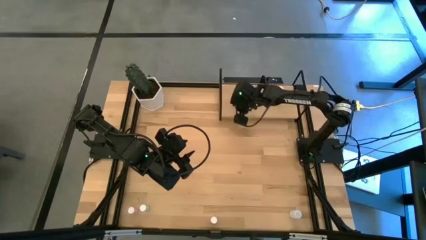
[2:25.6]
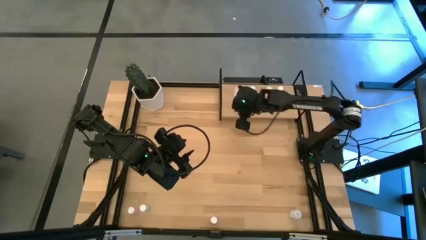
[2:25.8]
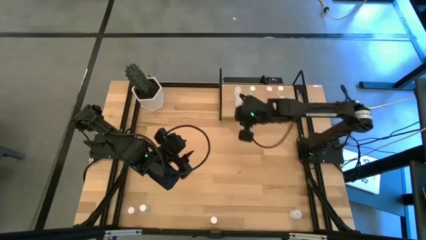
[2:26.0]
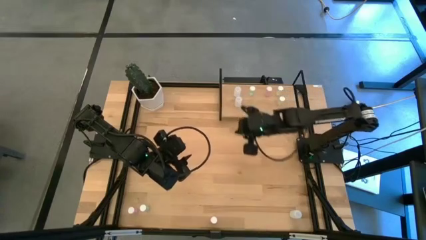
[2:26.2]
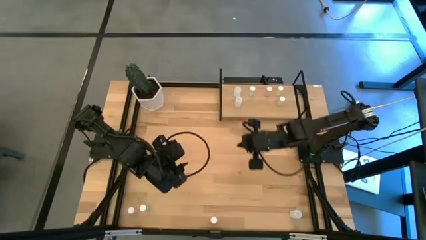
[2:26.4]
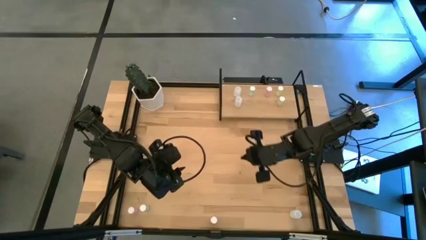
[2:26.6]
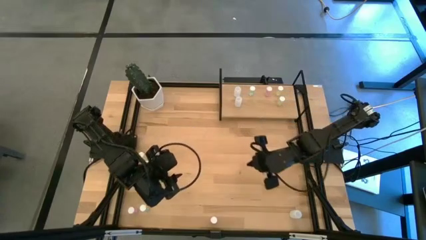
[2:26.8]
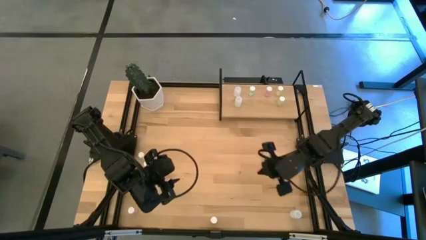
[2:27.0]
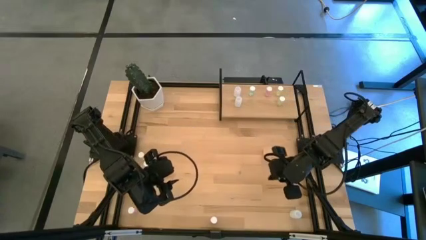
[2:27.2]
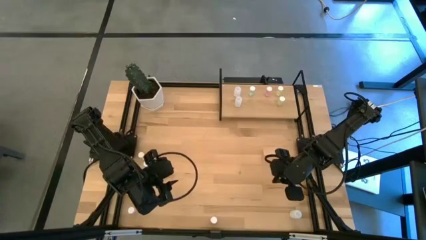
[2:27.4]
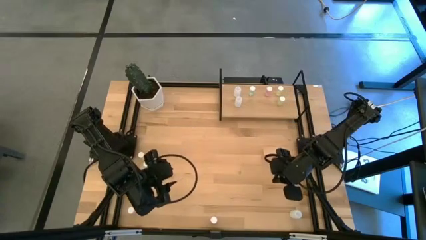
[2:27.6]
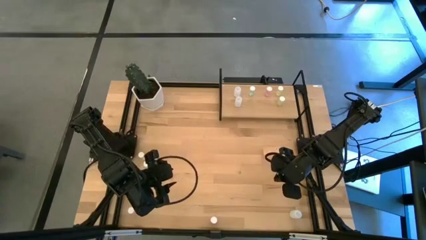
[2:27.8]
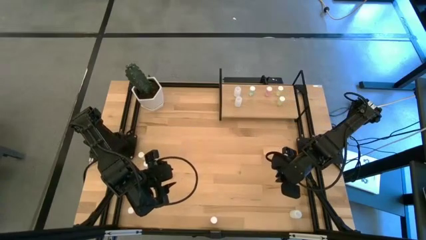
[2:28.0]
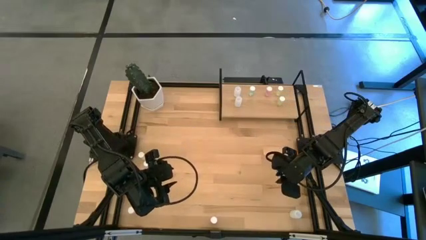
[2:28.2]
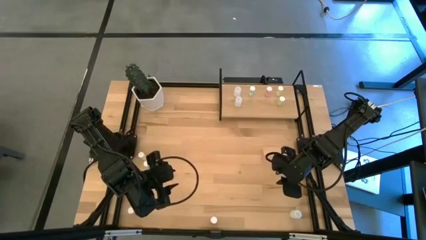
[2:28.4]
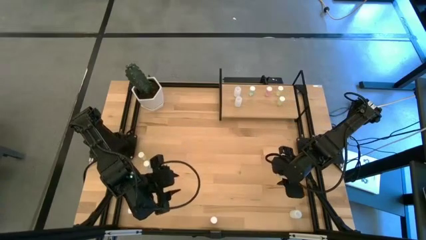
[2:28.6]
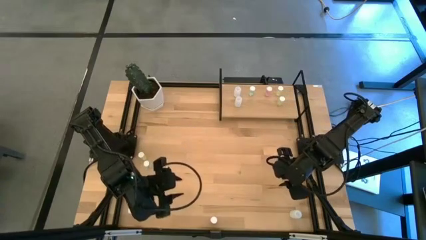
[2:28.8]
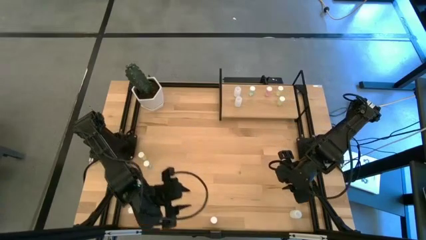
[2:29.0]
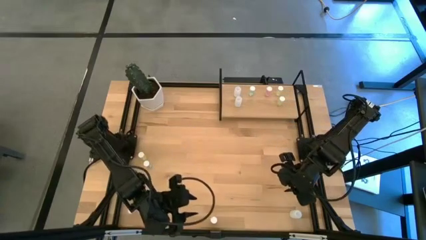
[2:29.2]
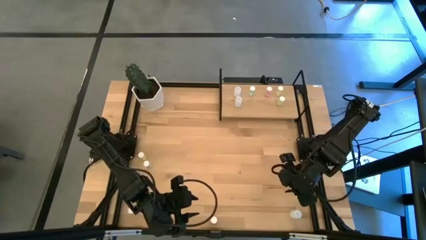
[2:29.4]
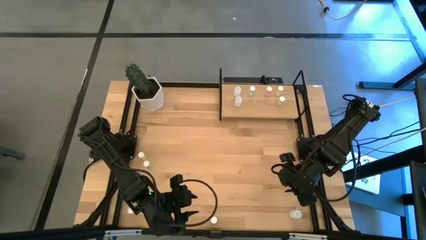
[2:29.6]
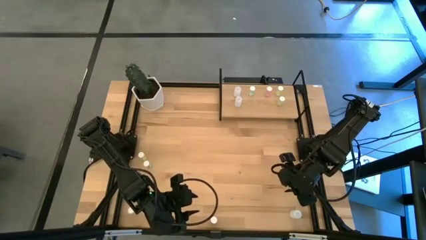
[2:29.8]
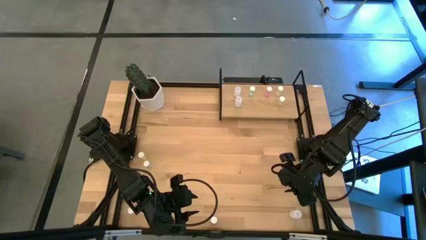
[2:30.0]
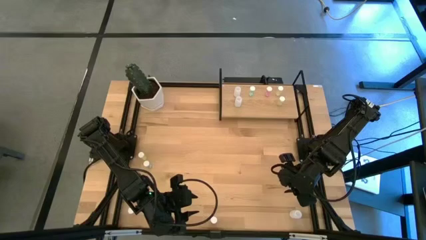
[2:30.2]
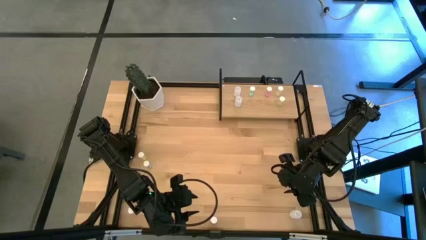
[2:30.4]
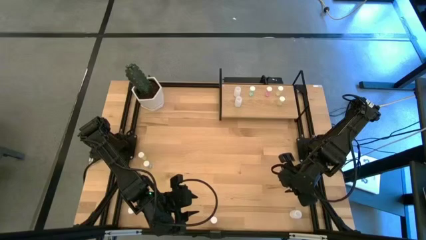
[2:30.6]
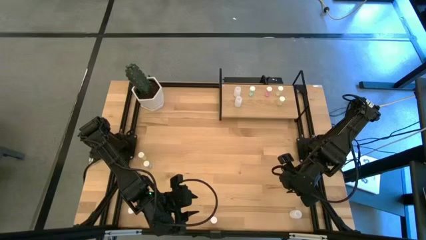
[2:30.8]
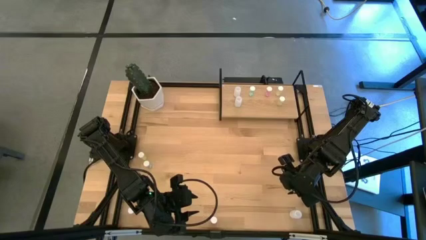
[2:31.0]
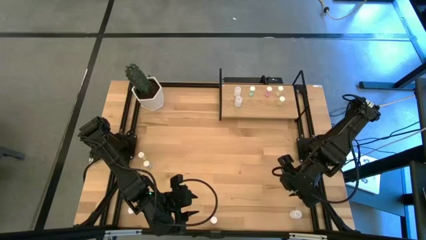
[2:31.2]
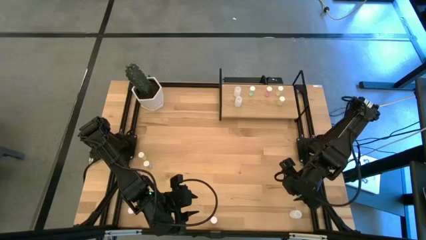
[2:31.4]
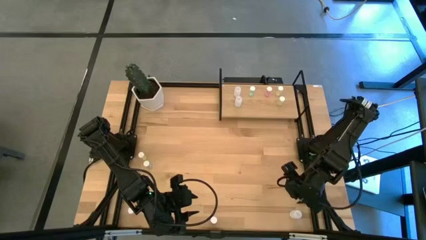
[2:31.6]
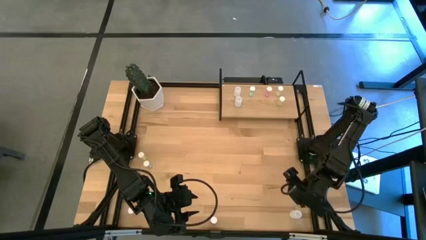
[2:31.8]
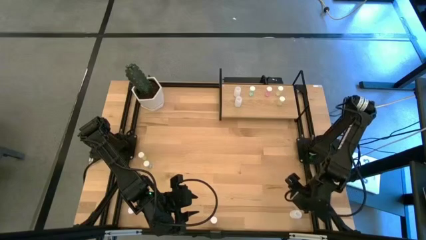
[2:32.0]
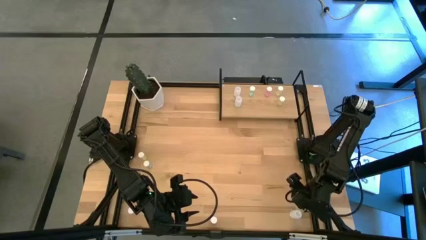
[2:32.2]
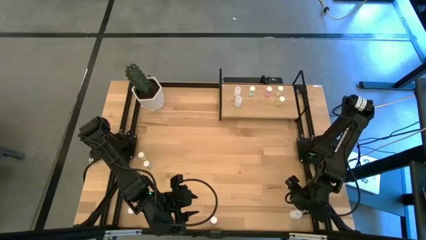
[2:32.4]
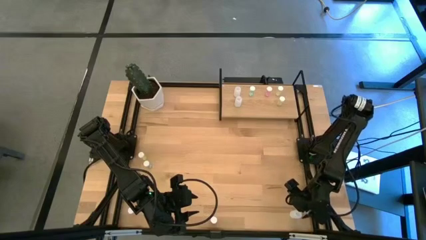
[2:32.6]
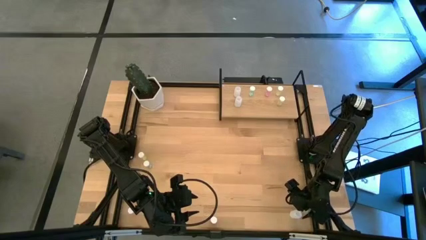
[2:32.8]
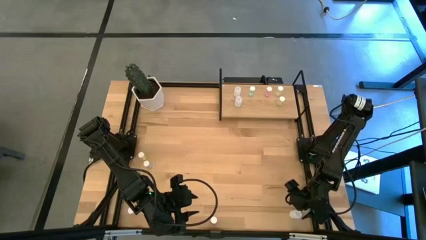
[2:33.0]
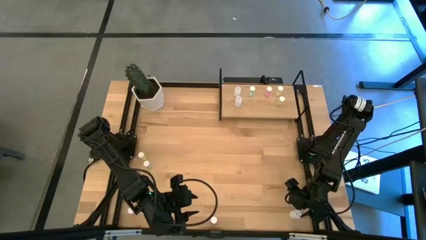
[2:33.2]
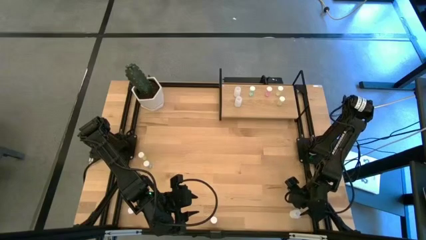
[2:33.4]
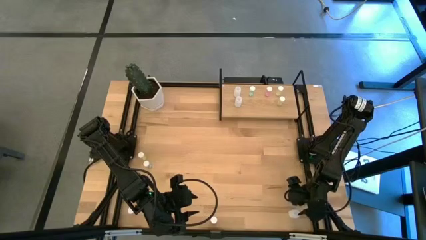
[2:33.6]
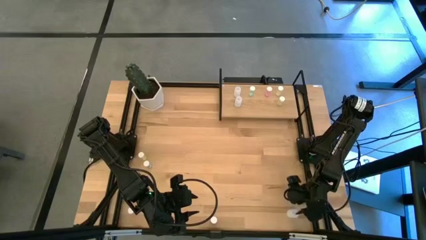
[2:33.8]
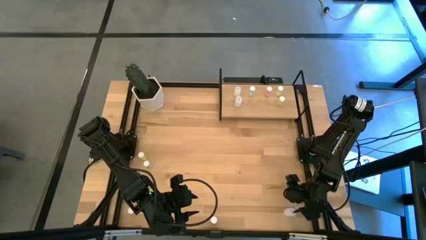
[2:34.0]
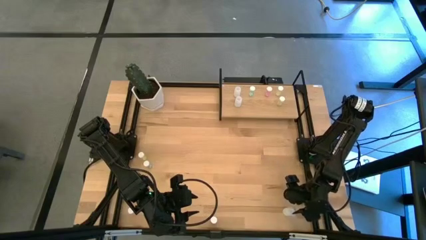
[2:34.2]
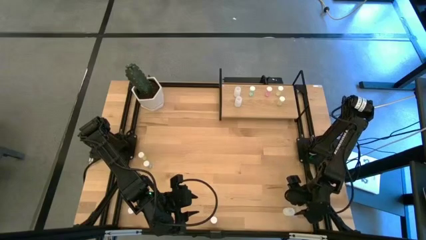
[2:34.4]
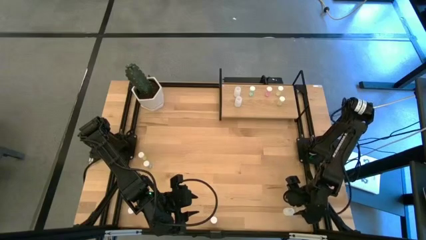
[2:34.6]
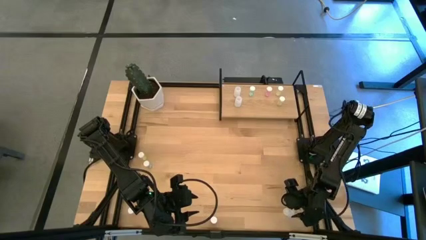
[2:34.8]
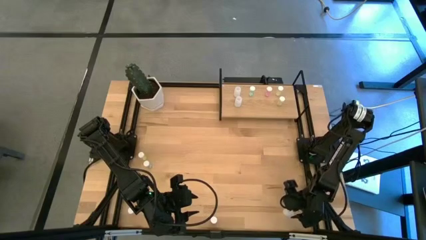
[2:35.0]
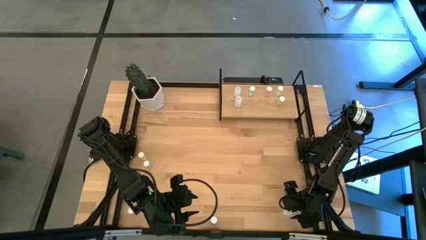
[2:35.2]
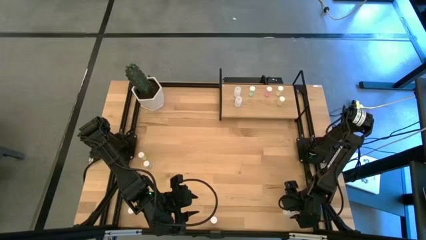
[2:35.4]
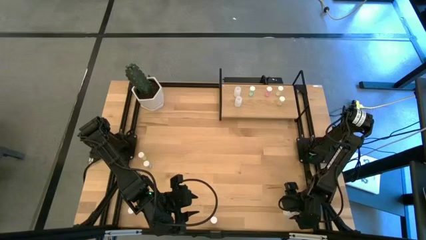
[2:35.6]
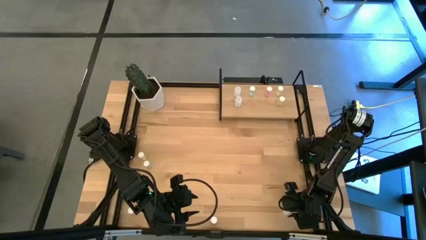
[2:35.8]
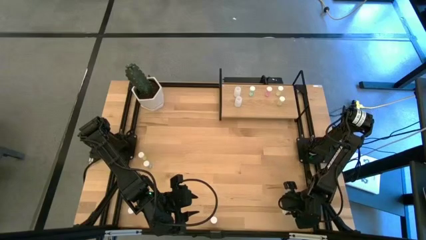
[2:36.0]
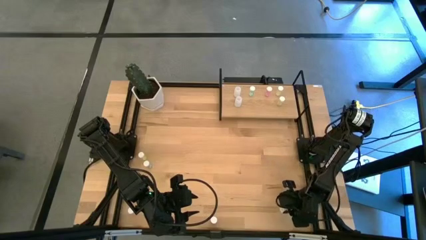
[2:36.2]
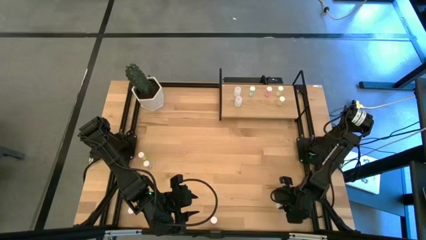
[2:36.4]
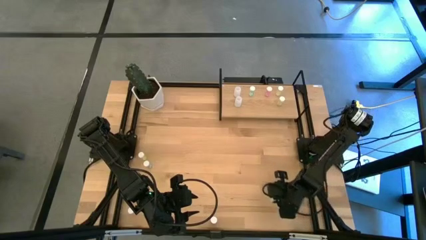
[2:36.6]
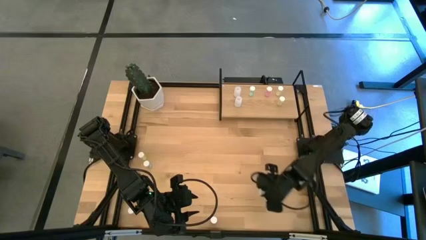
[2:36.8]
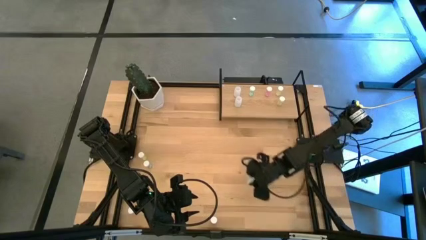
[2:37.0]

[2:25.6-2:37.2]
Task: Pick and place medicine bottles onto shelf by color
Put the transparent pill bottle on the shelf aligned with the other transparent pill bottles

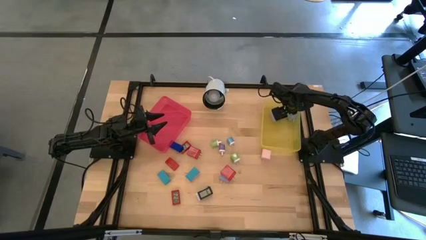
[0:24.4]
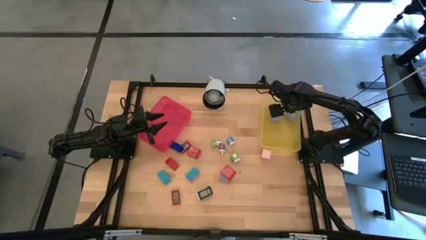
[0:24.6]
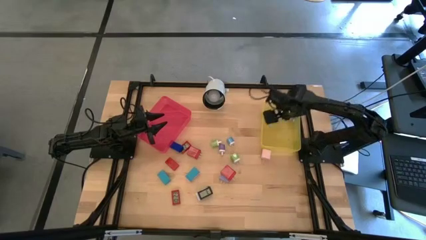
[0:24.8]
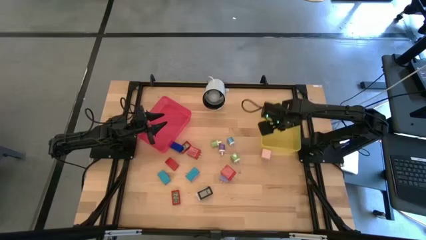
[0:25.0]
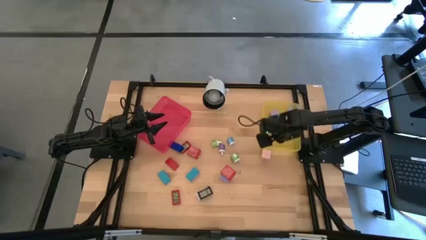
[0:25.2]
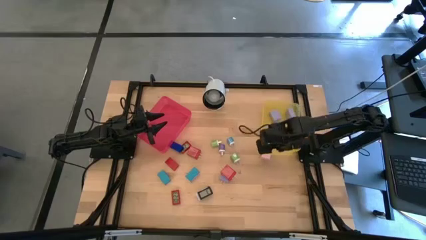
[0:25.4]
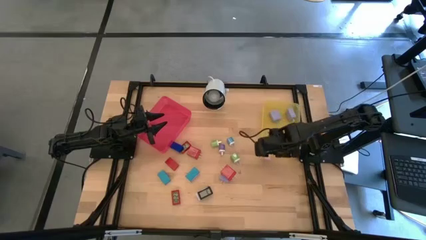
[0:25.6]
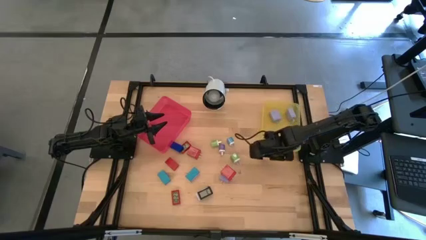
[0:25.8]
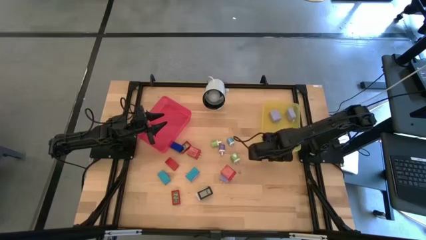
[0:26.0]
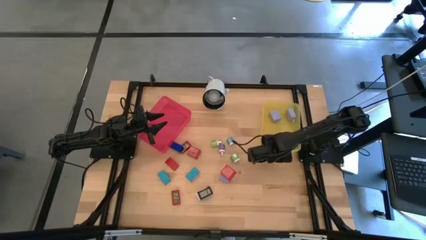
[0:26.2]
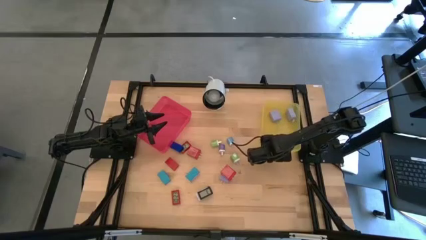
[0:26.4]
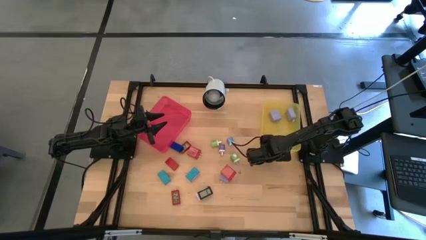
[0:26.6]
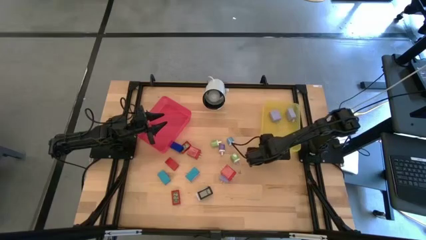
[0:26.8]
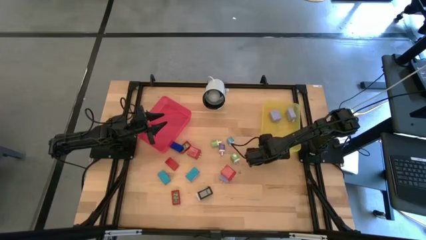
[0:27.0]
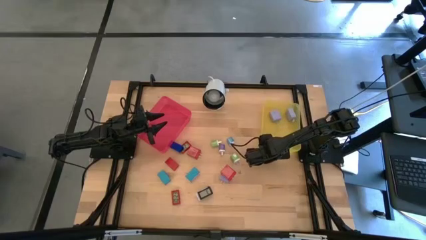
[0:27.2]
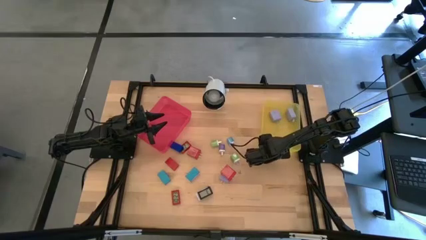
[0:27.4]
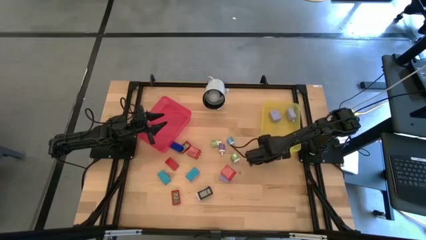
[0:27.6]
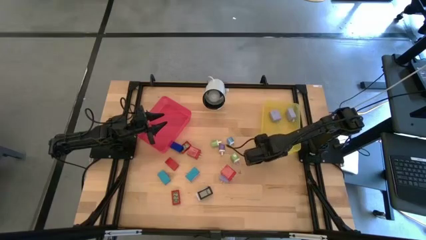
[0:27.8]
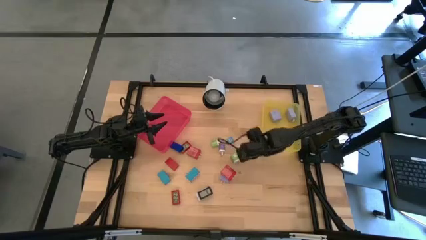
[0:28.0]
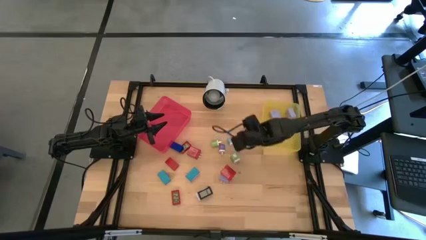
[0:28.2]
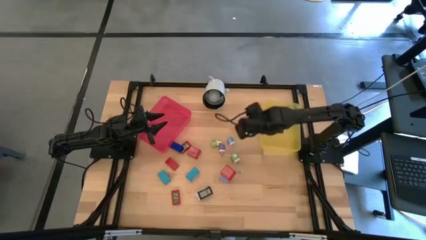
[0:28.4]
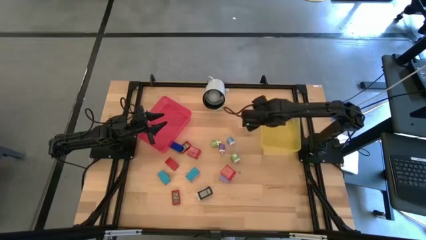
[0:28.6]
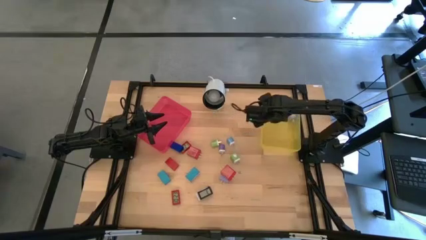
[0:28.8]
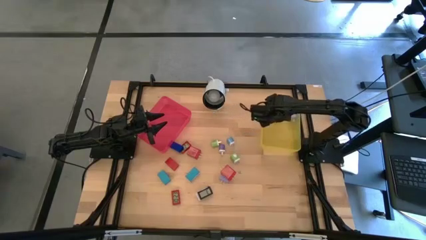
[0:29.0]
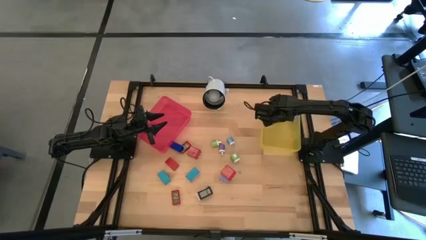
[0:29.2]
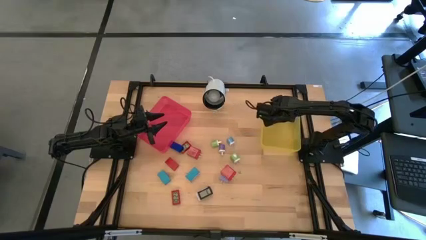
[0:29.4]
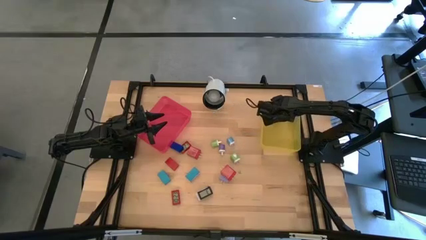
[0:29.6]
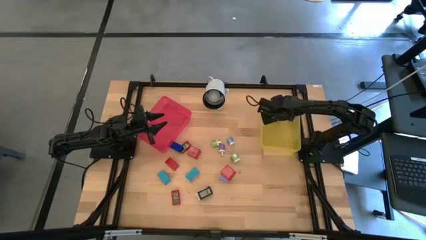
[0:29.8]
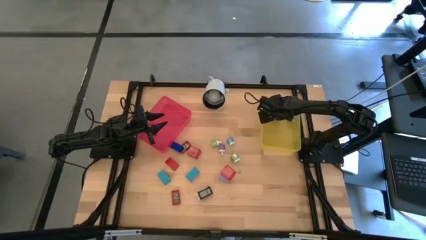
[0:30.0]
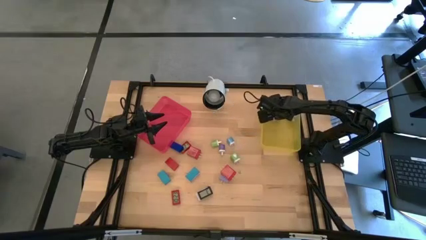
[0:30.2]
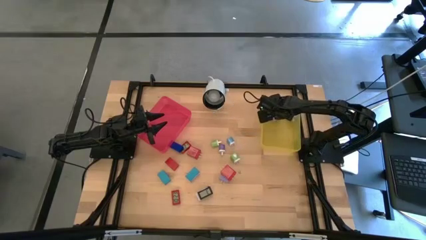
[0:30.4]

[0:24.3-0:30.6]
Task: Pick & Place Office items
Put the light orange charger adapter into the yellow bin
